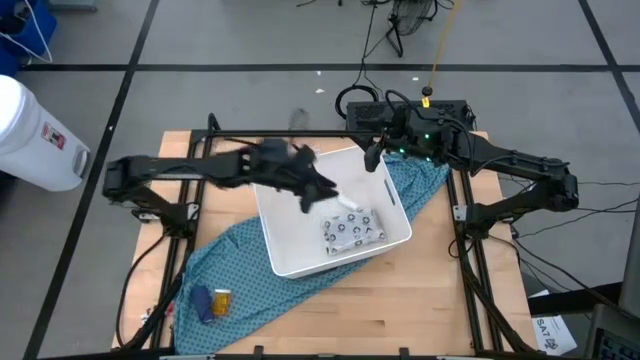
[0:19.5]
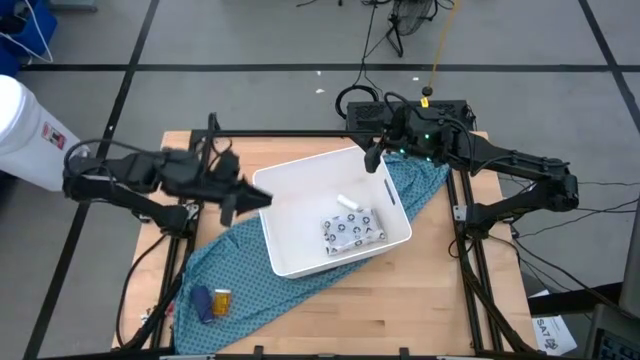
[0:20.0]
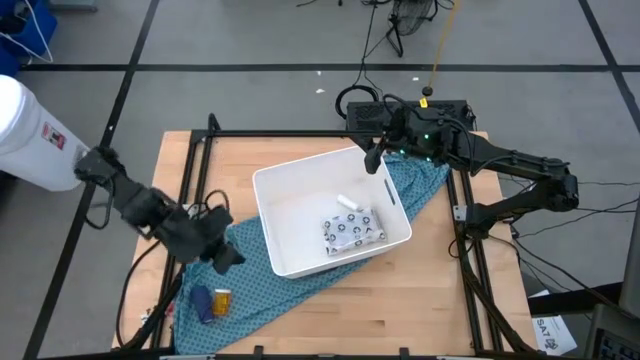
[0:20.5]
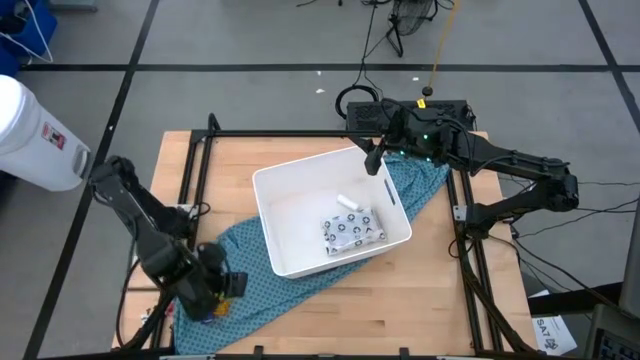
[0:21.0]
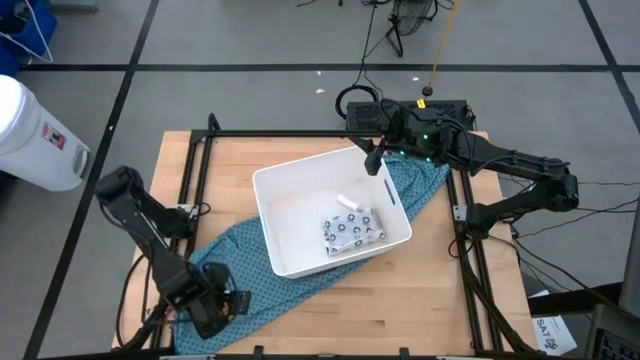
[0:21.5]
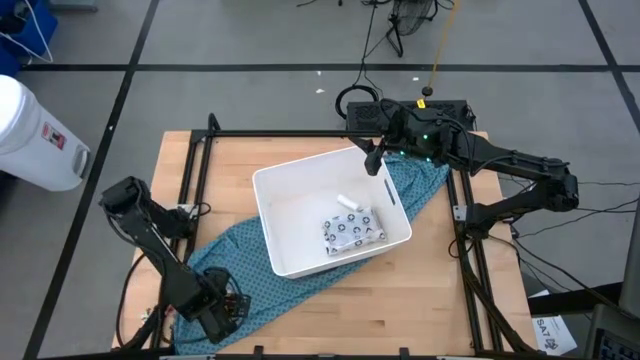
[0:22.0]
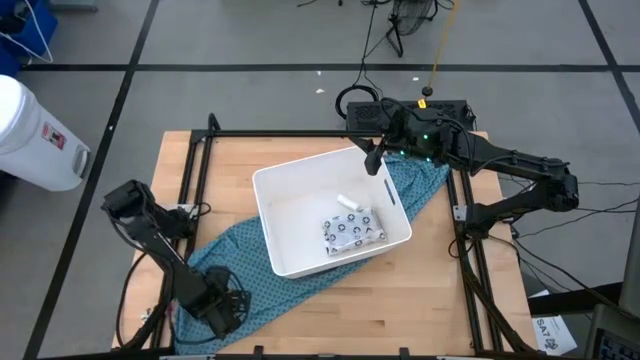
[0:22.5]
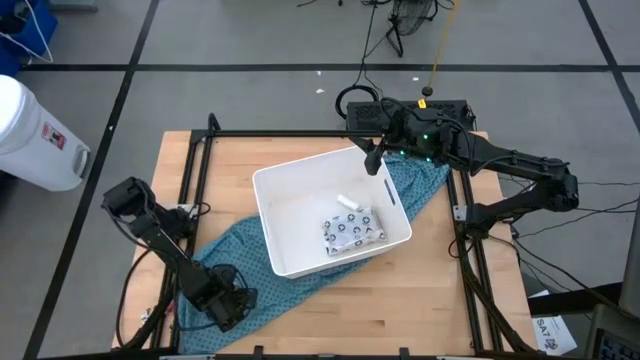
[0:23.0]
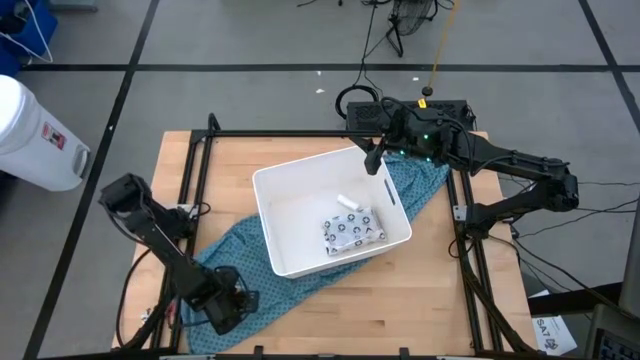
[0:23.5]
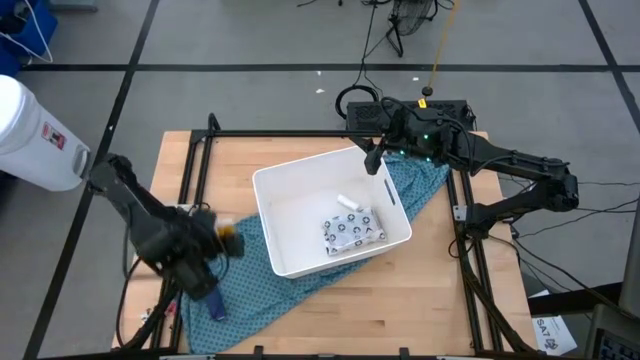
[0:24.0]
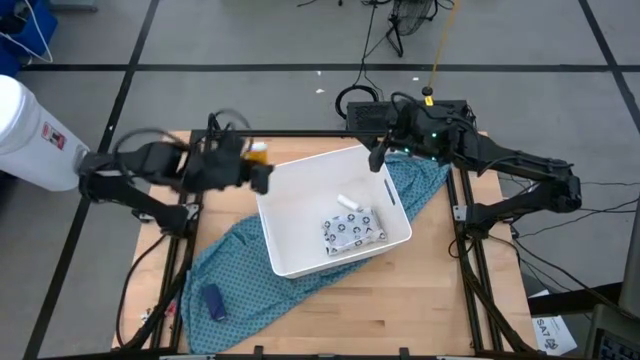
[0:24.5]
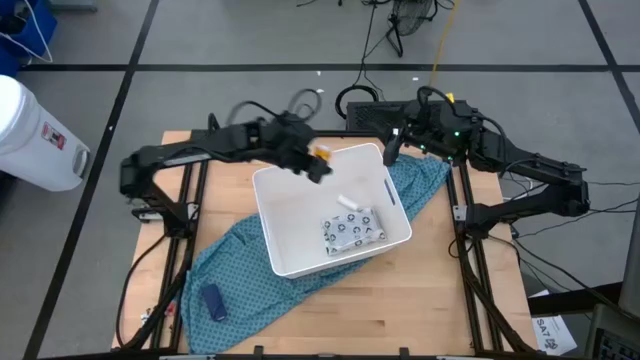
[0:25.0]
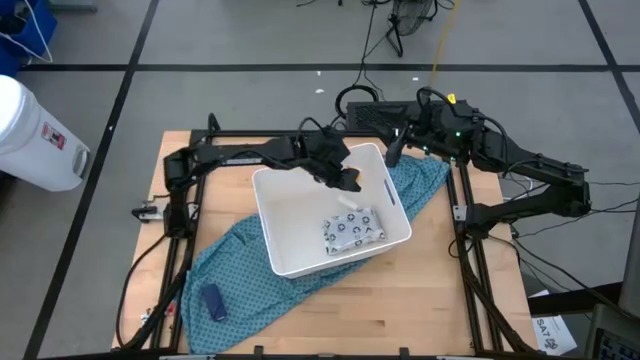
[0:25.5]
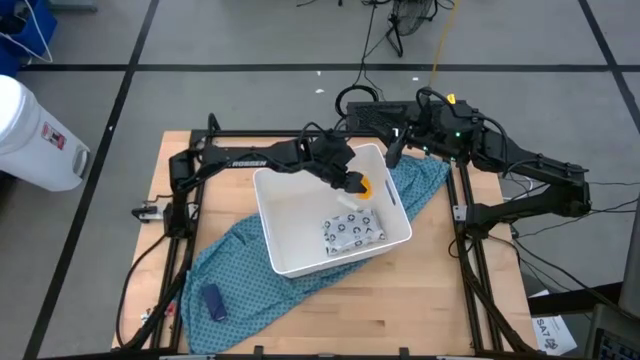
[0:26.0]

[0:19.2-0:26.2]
Task: Pick & place medical supplies in basket/bin
Put the orange pill bottle into the white bin

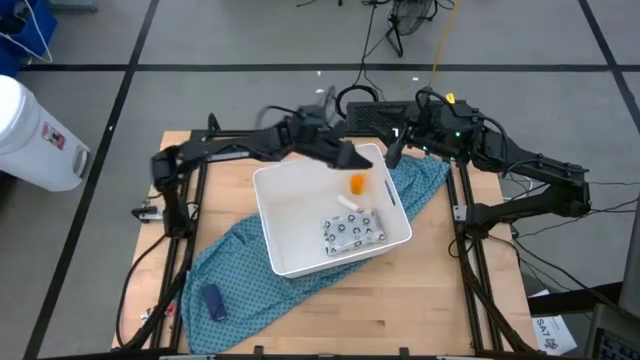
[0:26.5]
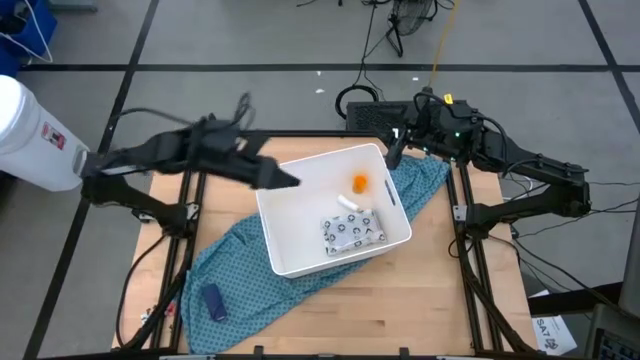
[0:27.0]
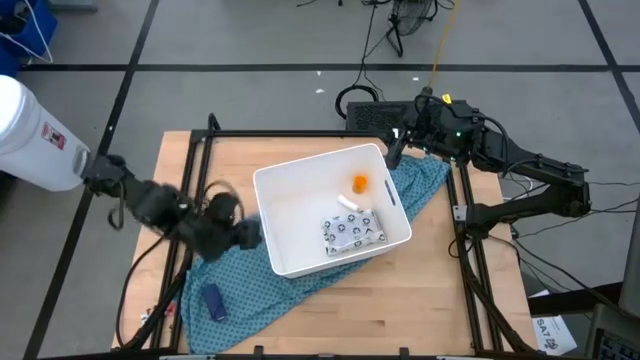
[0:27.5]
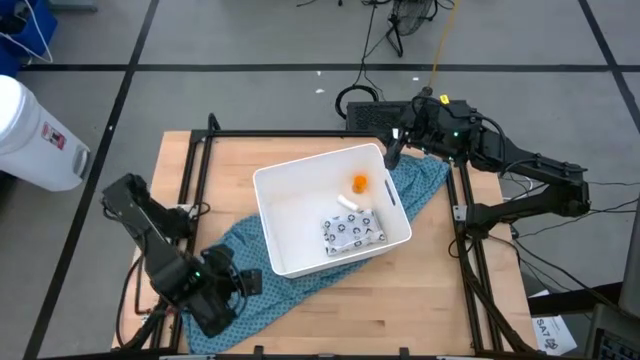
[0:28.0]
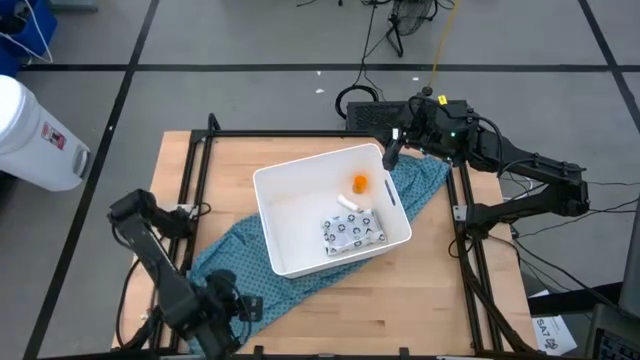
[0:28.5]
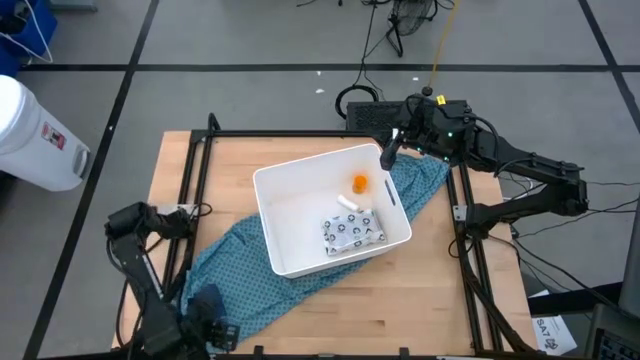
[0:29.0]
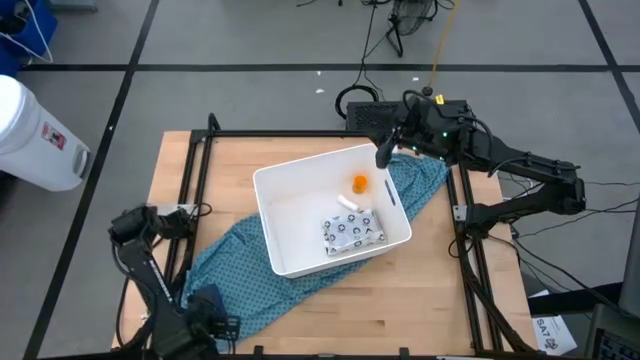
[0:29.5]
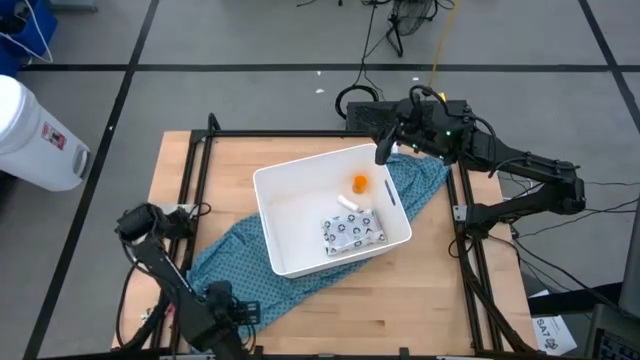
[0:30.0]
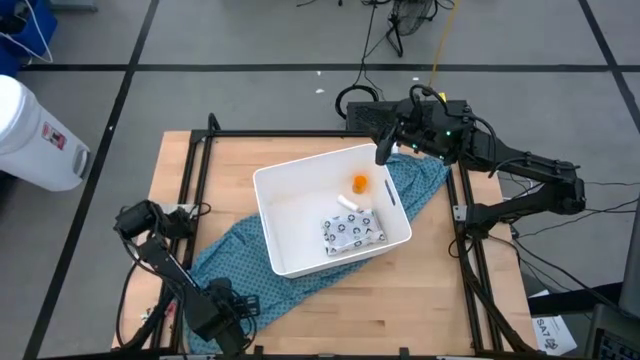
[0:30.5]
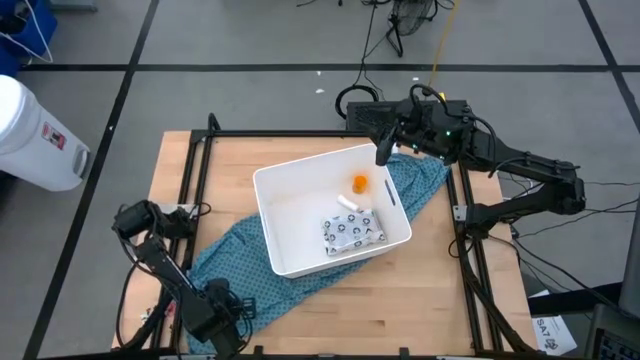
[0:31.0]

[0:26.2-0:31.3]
Put the blue bandage into the white bin

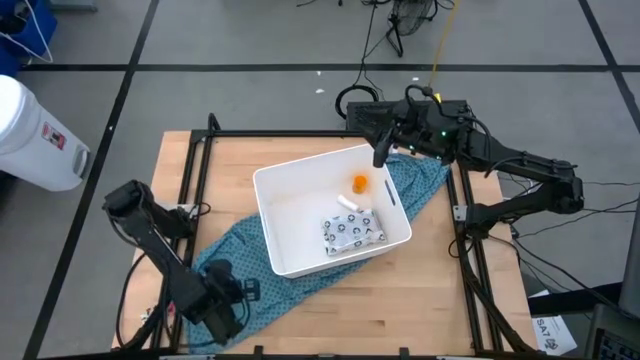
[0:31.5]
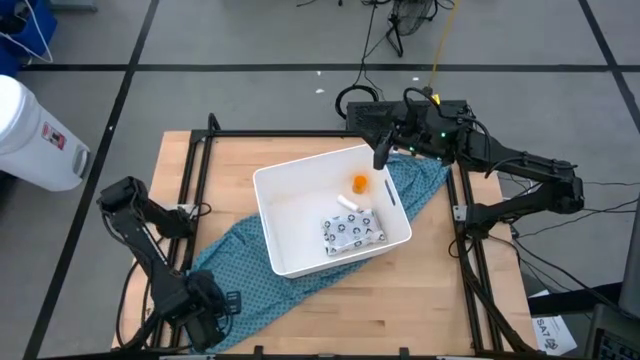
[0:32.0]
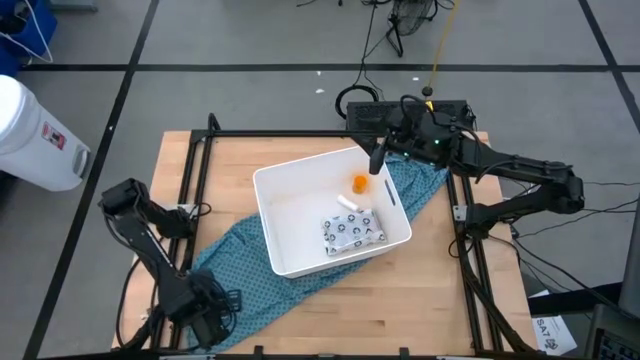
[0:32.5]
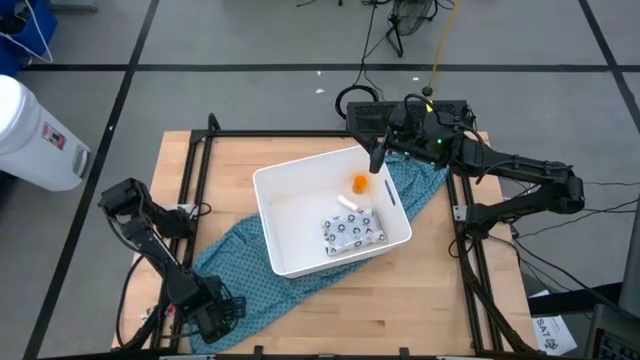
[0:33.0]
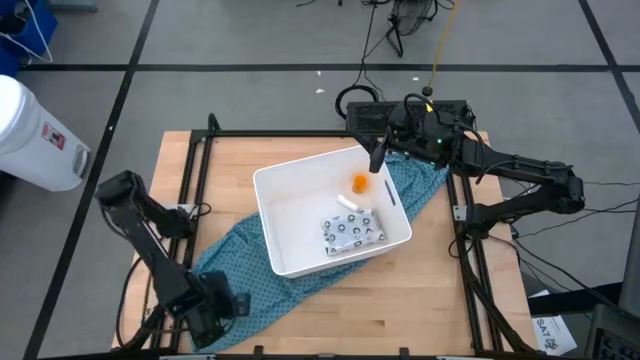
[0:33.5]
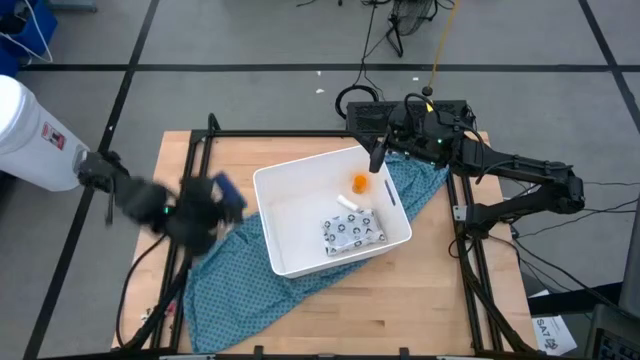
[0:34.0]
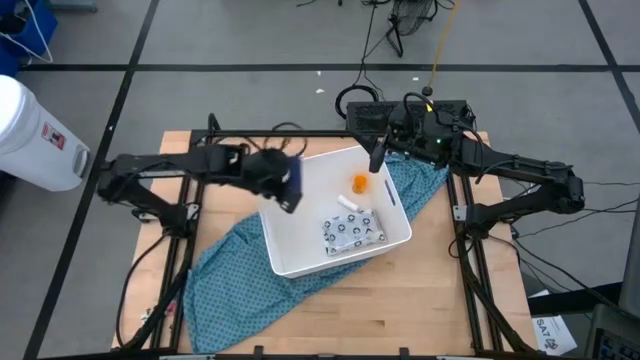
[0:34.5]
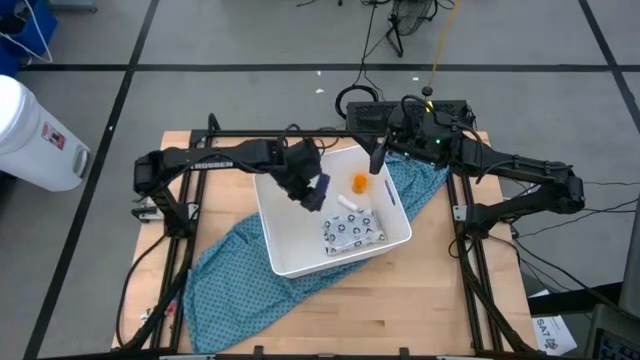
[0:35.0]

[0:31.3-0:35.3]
Put the blue bandage into the white bin

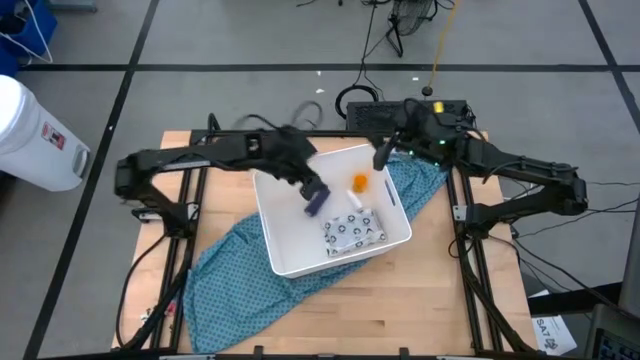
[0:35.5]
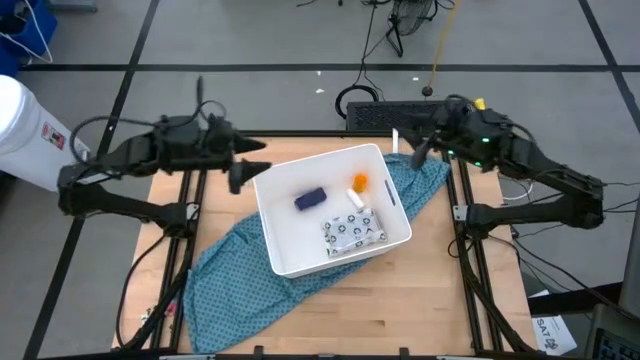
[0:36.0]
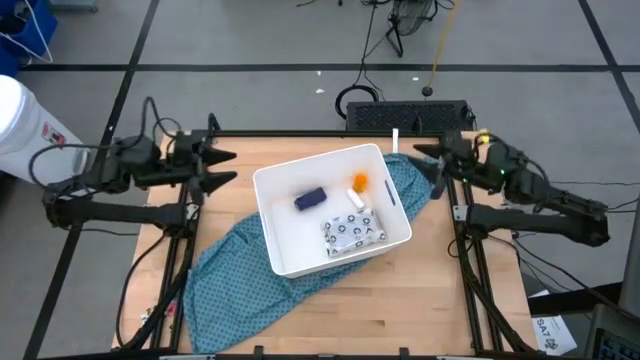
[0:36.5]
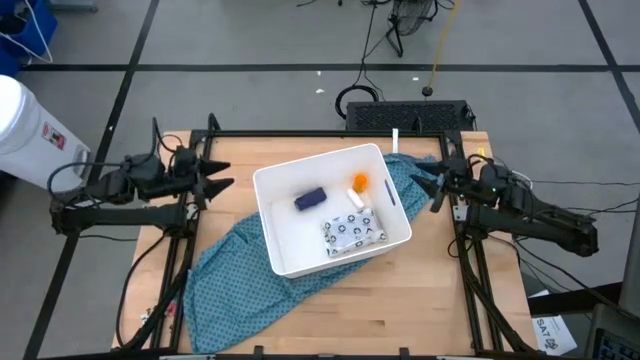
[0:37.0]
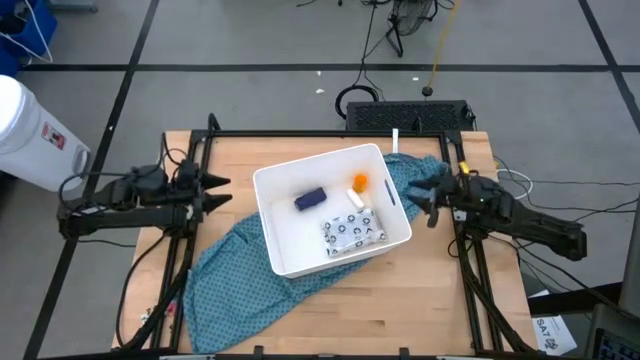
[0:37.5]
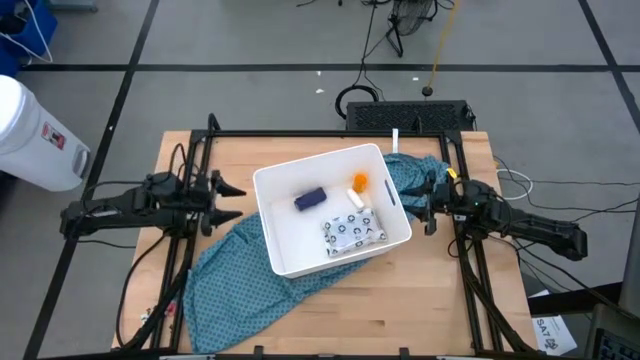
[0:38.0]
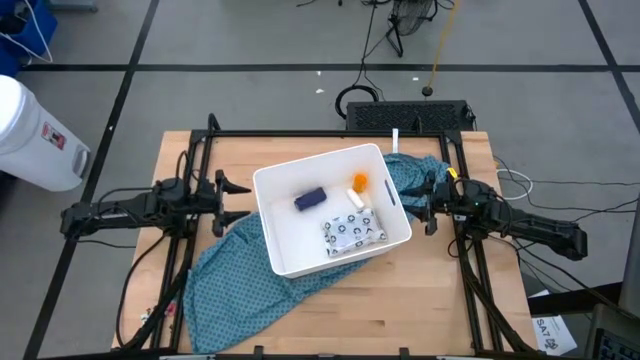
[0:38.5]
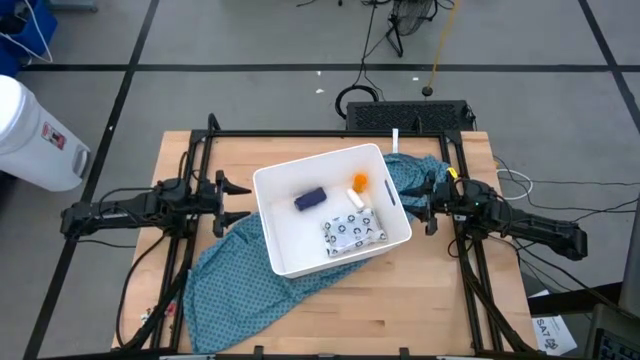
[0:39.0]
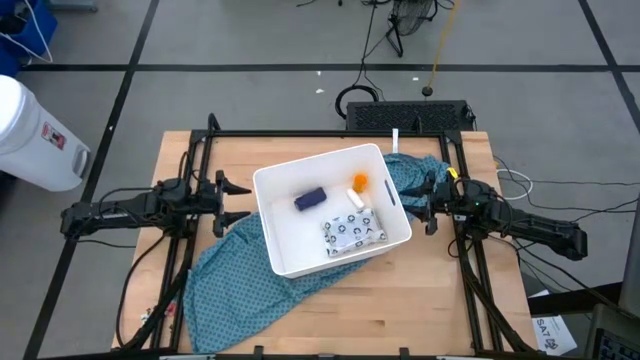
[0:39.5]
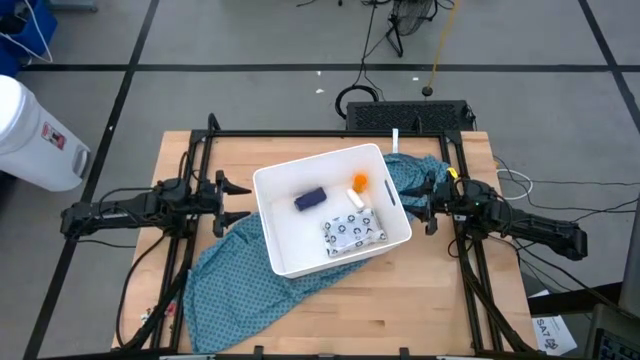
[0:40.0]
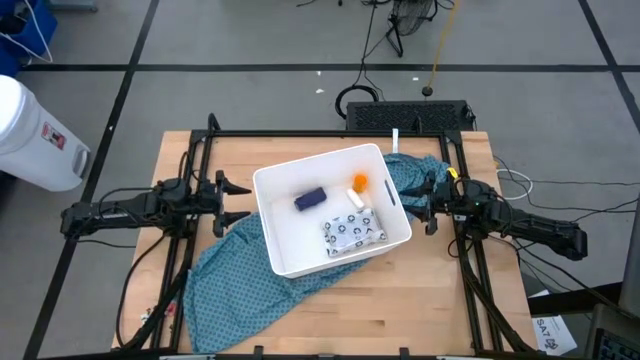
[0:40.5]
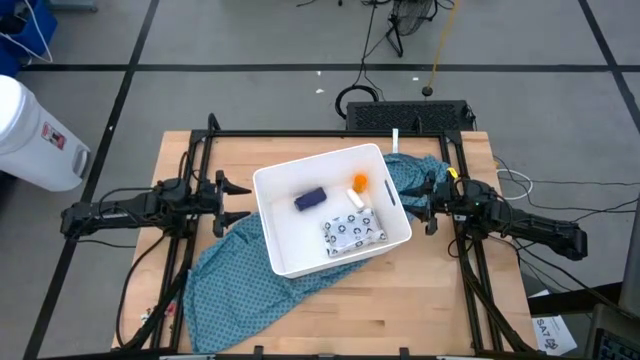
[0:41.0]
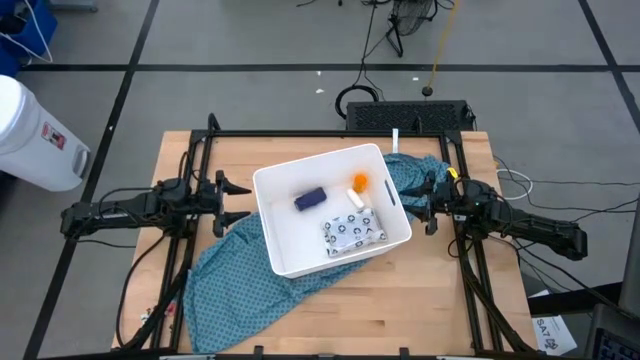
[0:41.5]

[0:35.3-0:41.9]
Return to Home Position
